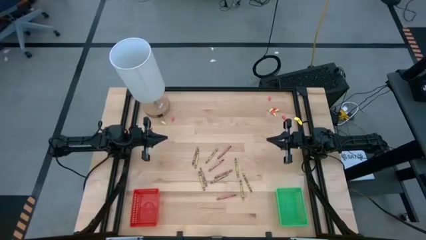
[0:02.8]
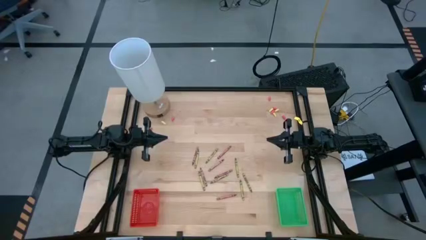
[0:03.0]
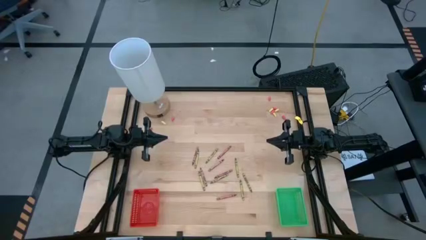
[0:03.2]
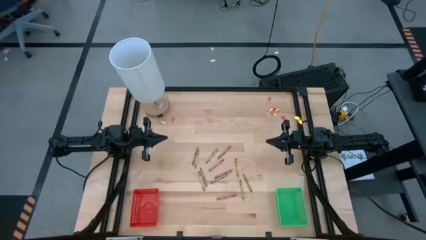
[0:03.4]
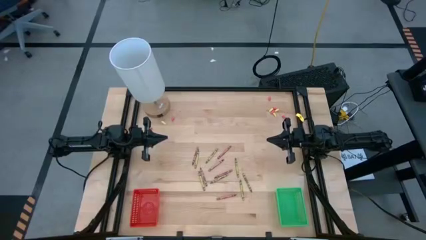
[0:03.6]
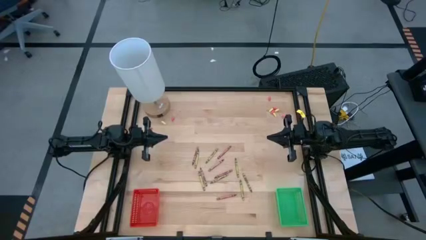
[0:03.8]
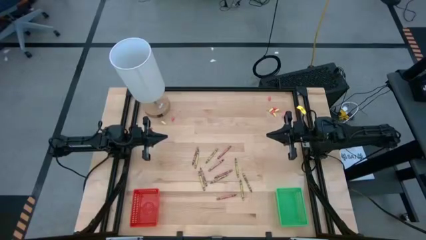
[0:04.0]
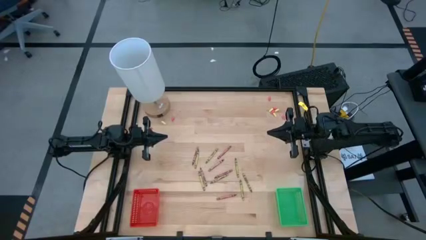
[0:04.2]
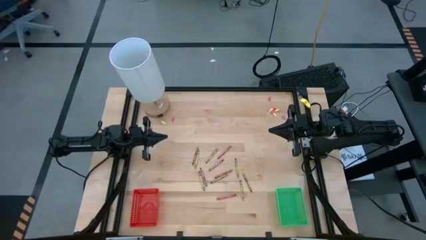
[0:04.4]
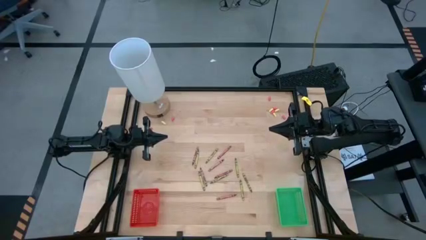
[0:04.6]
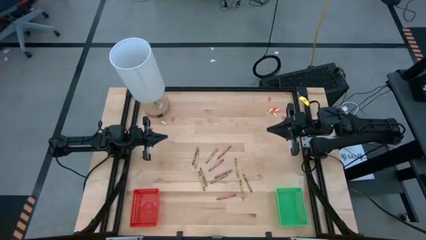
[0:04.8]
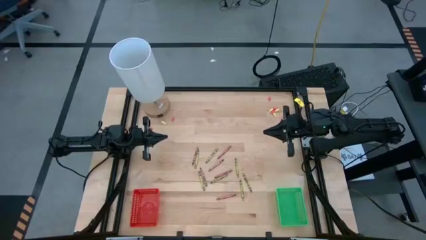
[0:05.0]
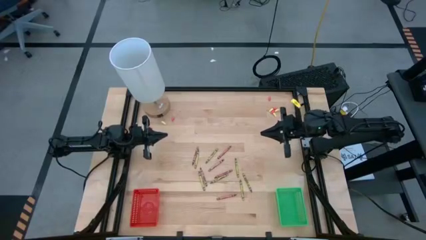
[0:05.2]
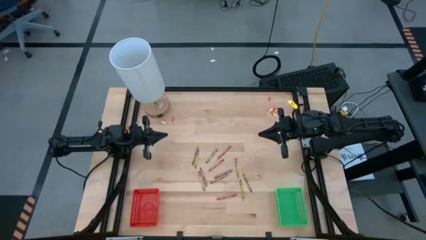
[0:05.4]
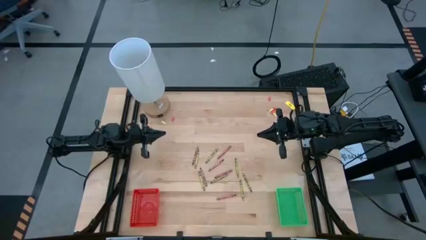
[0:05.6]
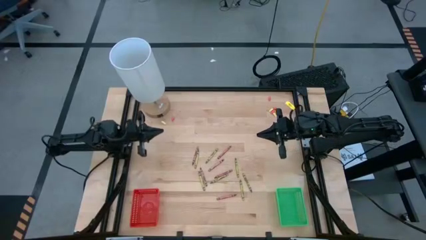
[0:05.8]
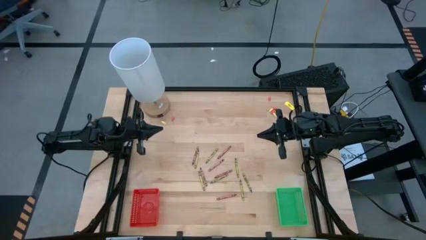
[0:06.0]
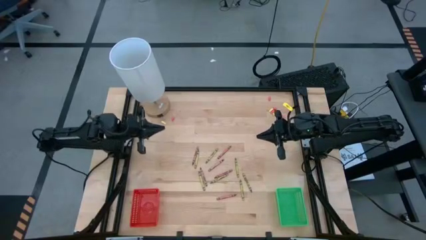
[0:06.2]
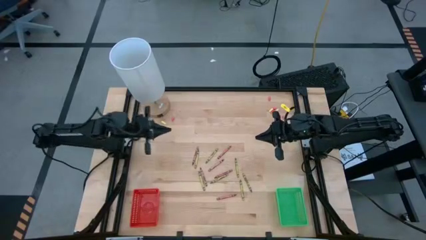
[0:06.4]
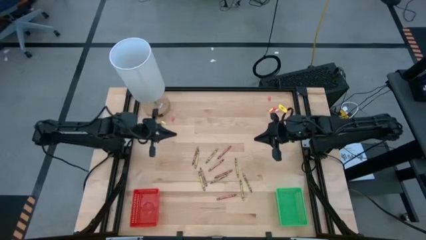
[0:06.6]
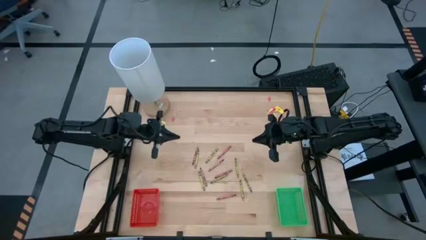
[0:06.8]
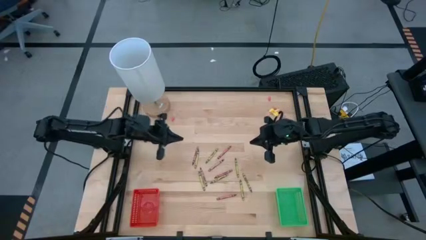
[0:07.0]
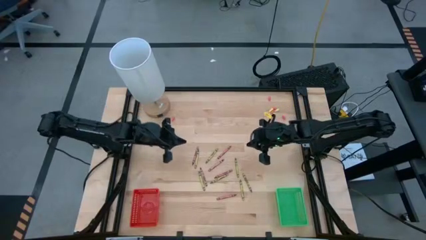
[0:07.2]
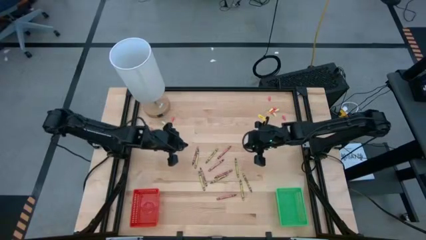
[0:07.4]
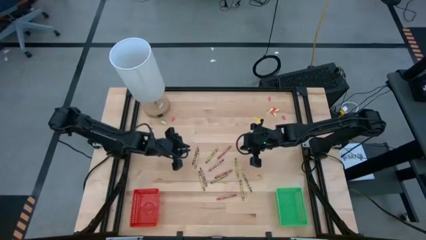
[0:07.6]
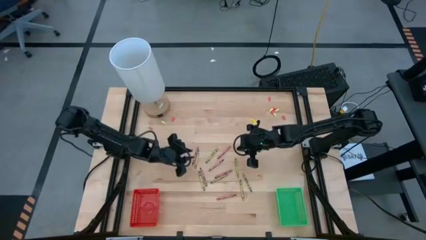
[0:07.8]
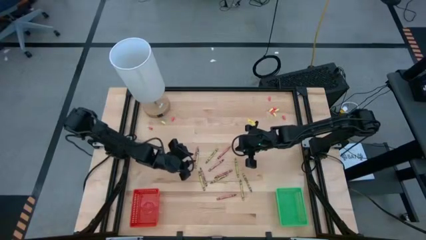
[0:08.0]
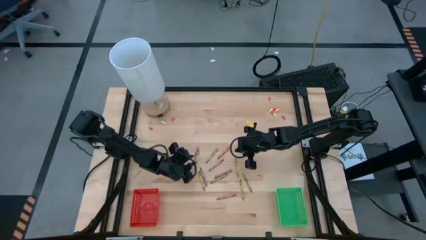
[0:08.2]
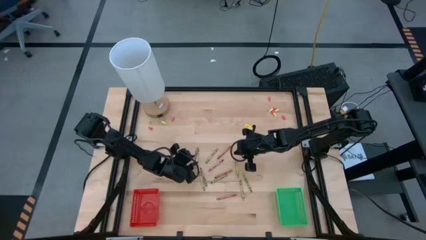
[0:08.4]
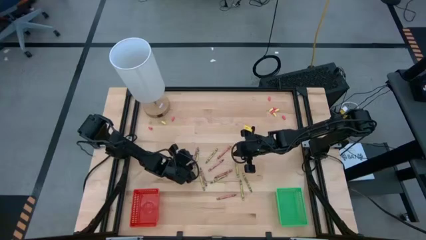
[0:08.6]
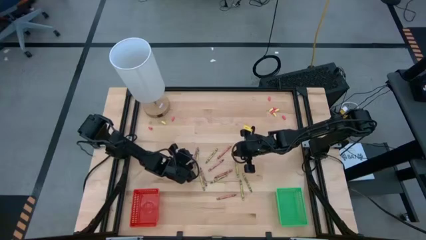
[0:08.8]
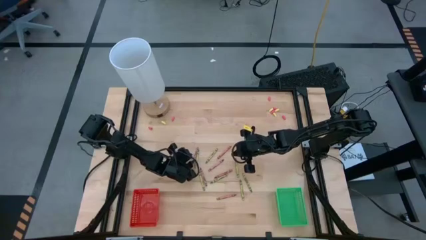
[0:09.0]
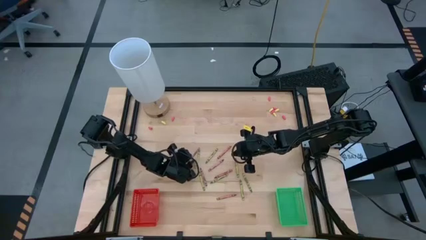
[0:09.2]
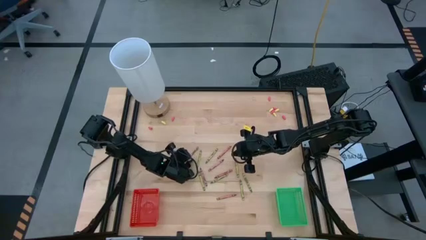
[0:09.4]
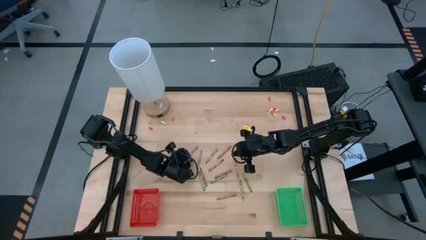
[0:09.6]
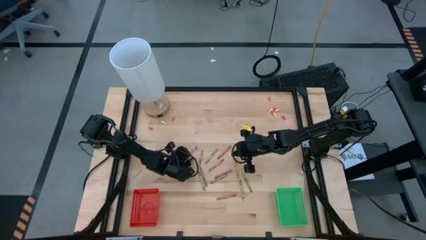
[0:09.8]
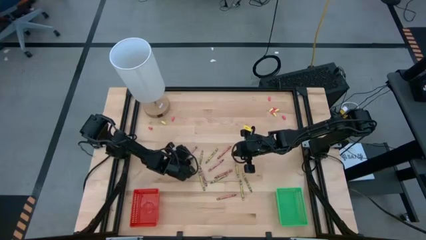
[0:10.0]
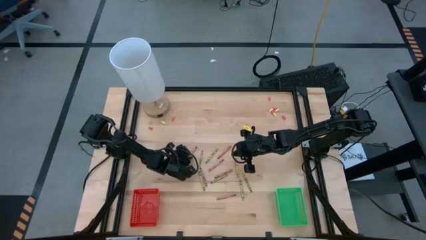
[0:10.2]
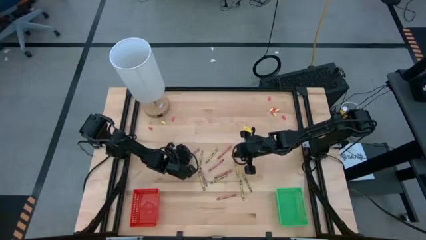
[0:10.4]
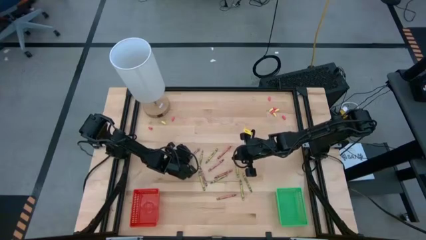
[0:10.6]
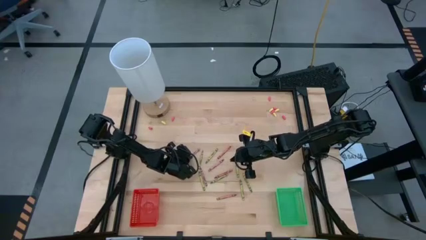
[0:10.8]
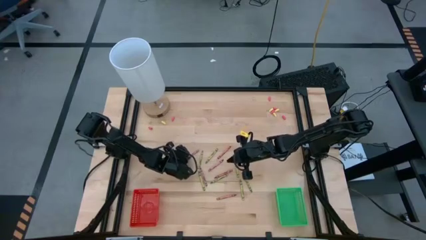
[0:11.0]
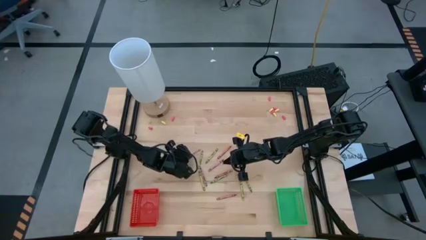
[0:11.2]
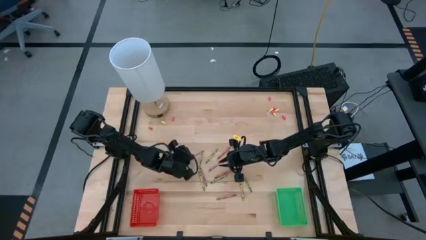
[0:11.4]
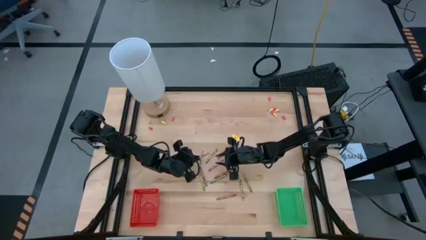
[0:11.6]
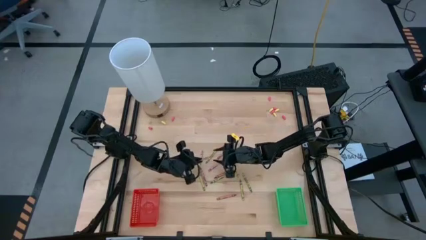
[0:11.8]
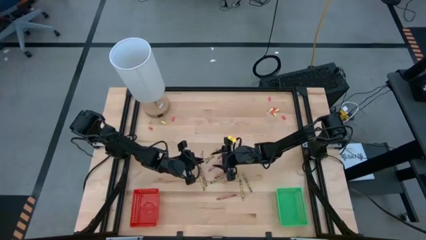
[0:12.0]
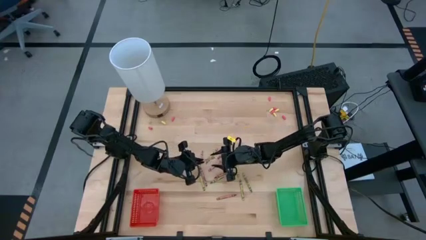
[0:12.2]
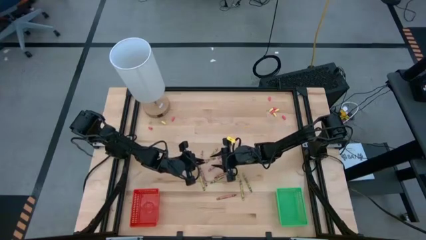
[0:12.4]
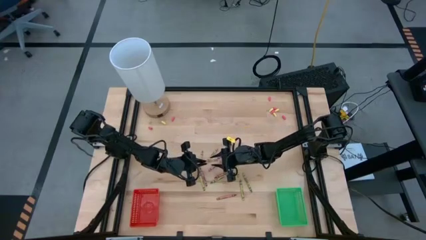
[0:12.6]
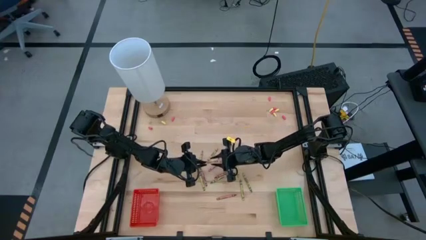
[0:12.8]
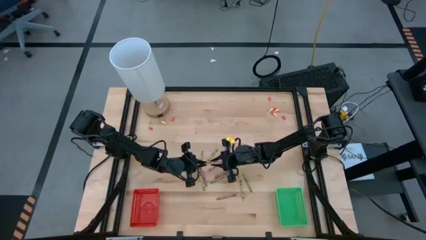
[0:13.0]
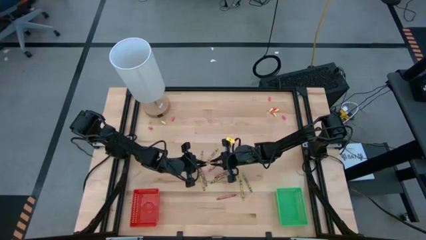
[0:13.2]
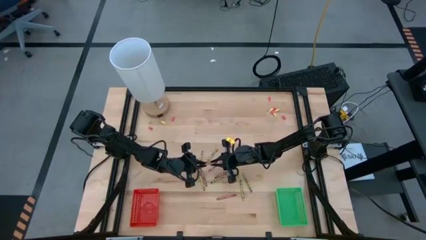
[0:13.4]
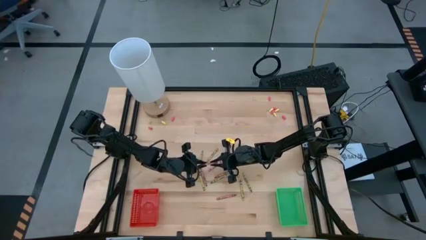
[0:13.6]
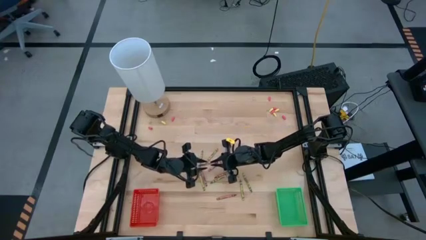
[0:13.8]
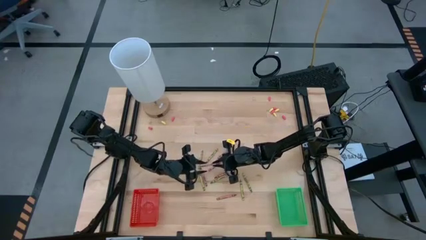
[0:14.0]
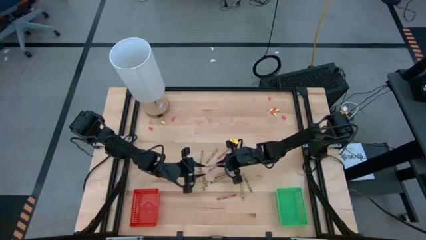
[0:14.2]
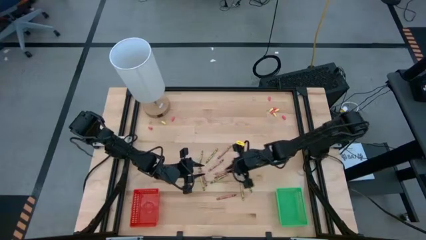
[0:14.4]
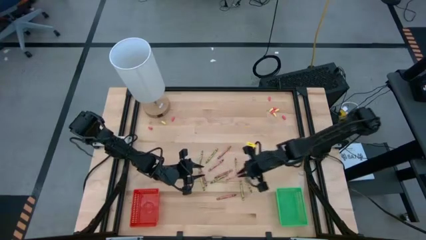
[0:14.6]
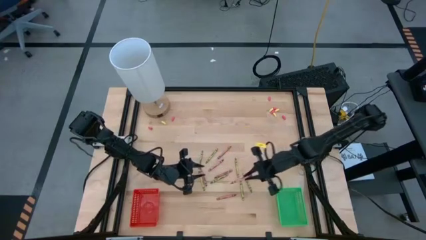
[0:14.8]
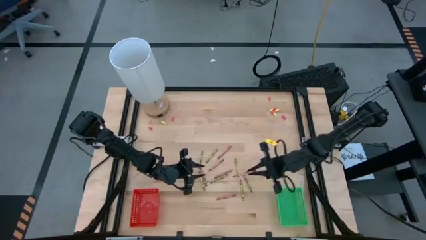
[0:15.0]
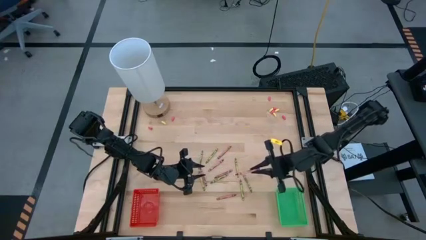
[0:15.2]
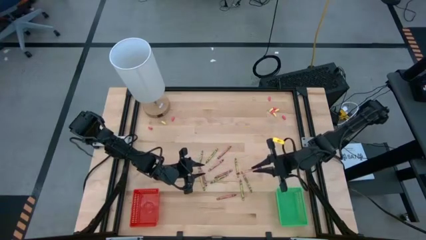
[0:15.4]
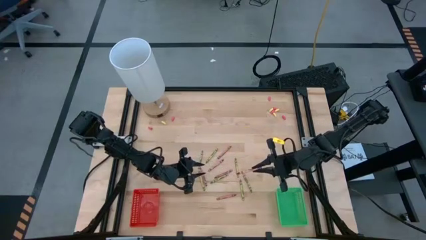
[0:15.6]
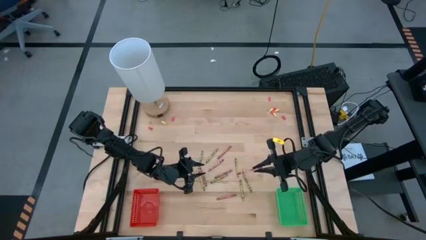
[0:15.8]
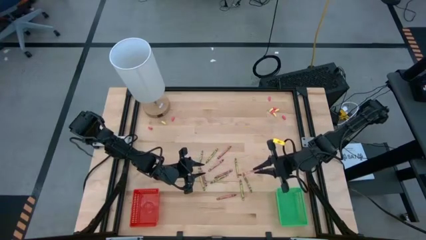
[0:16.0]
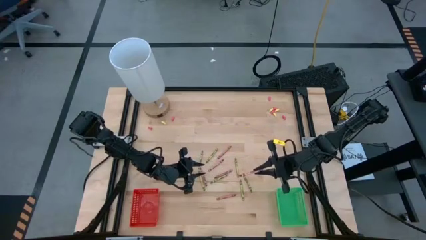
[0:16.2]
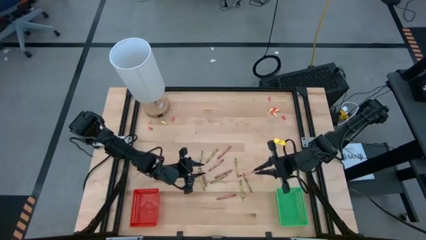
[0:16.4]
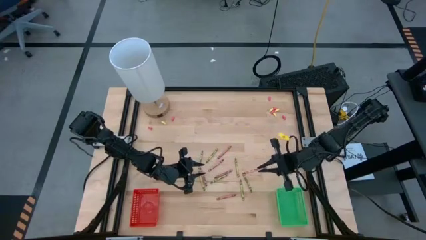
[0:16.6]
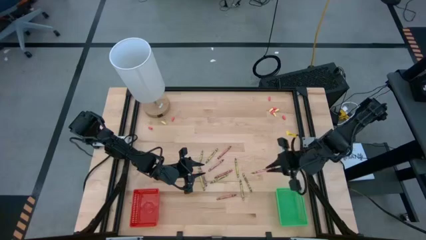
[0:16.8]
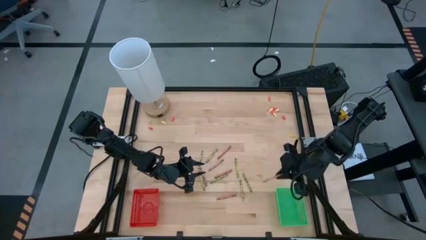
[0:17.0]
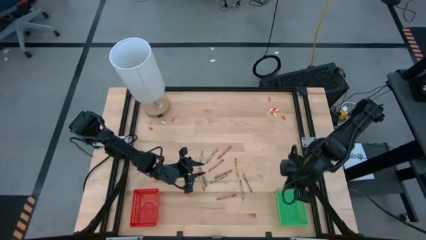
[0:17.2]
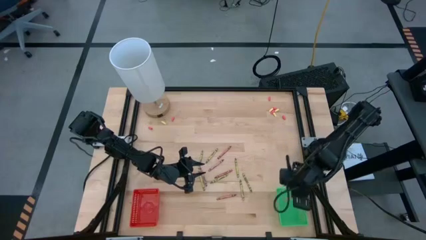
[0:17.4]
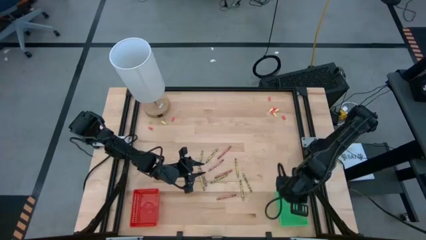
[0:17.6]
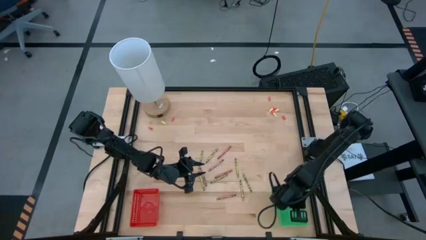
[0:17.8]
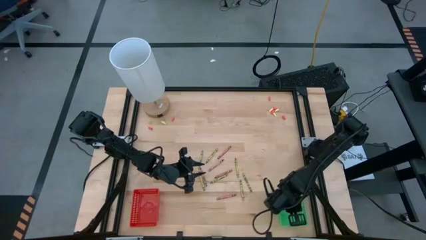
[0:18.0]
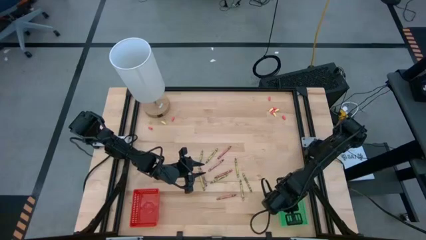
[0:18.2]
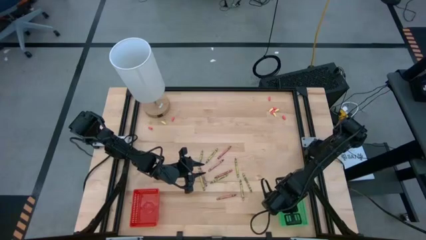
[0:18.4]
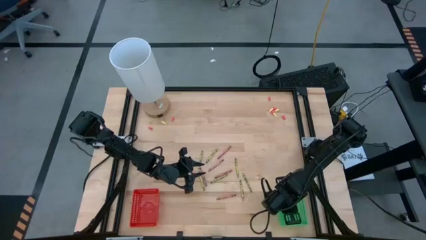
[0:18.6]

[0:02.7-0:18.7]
Task: Sort crayons
Put the red crayon into the green bin
